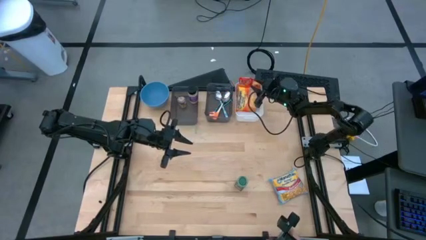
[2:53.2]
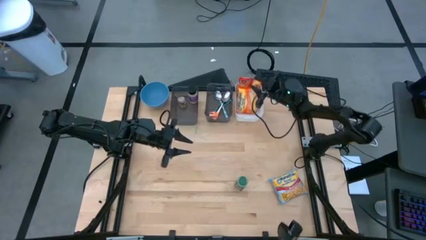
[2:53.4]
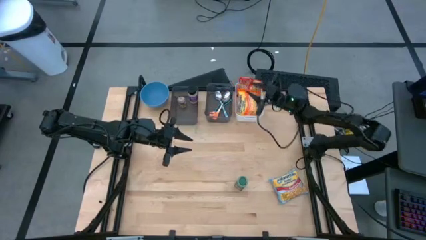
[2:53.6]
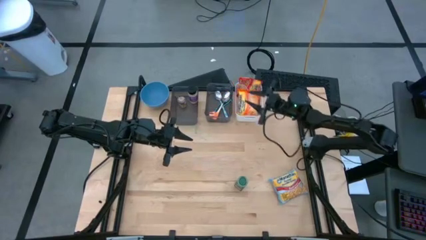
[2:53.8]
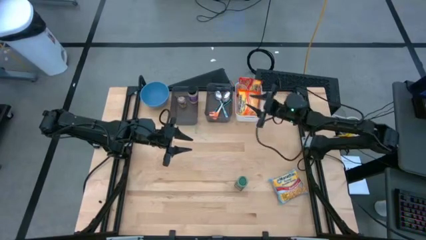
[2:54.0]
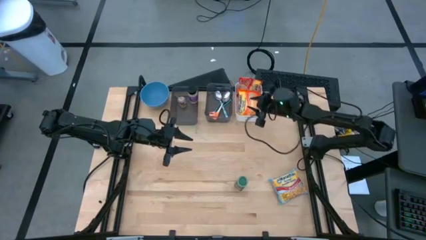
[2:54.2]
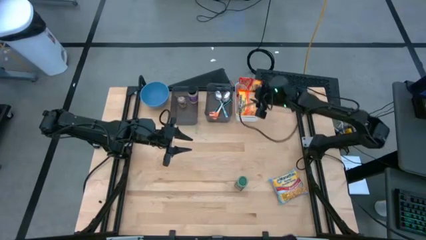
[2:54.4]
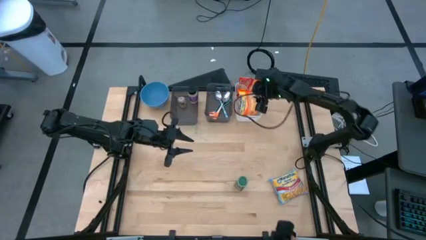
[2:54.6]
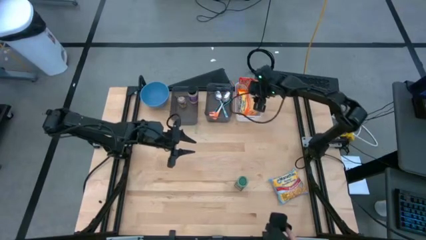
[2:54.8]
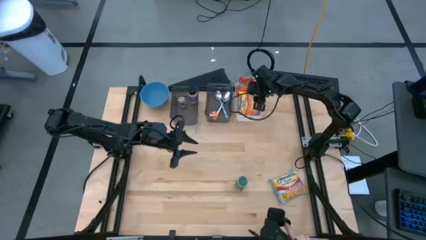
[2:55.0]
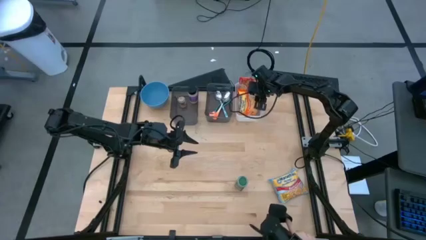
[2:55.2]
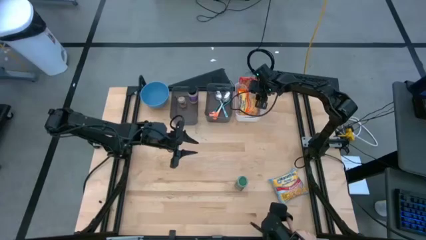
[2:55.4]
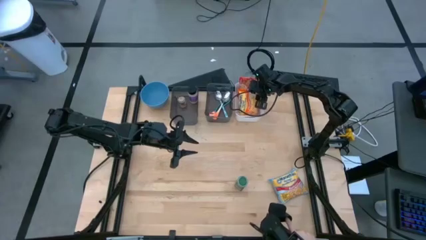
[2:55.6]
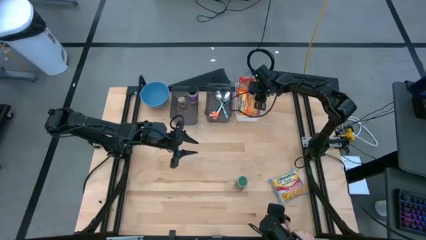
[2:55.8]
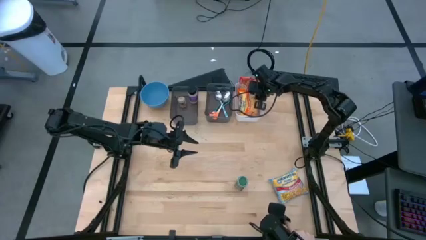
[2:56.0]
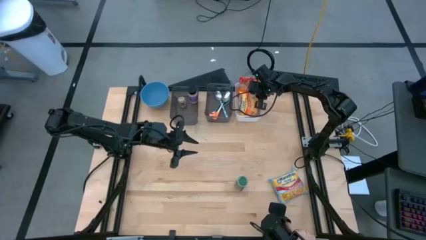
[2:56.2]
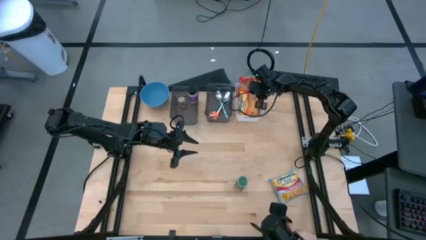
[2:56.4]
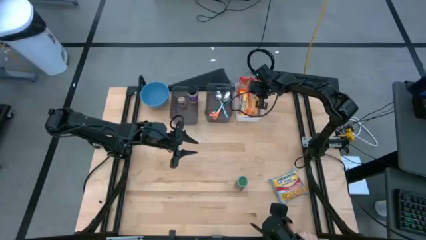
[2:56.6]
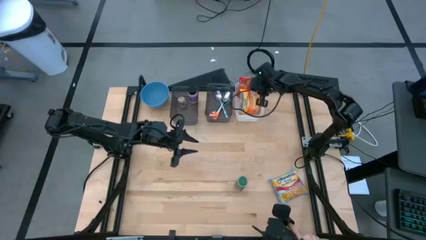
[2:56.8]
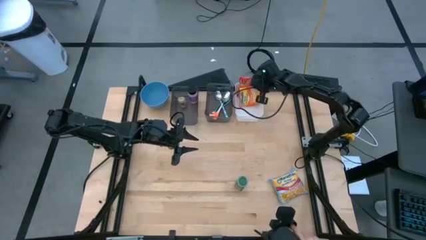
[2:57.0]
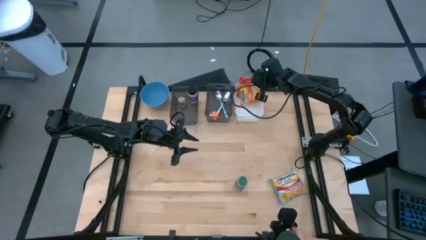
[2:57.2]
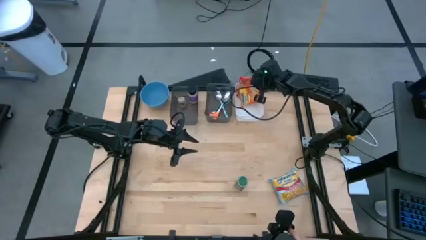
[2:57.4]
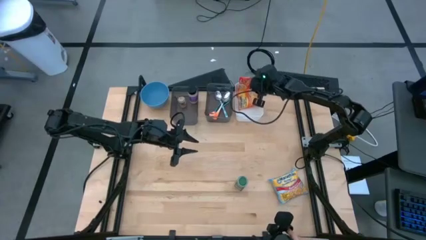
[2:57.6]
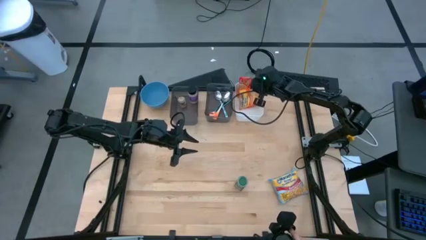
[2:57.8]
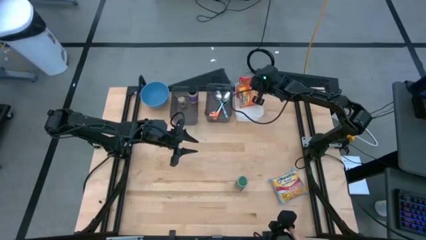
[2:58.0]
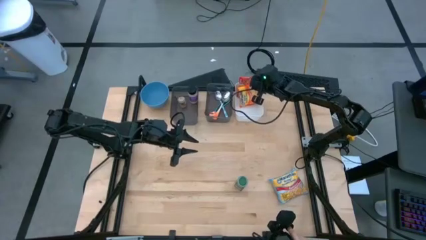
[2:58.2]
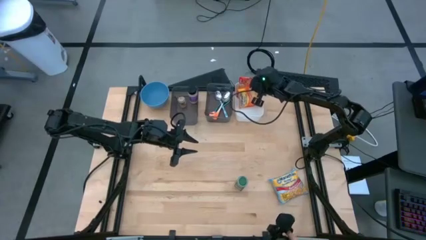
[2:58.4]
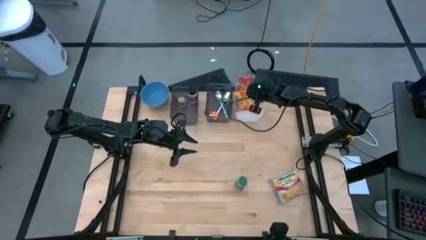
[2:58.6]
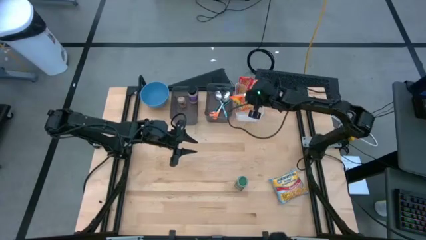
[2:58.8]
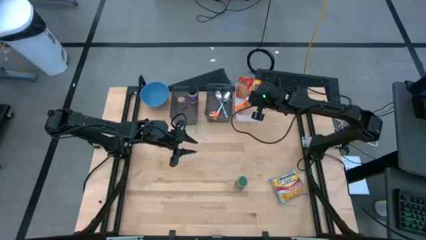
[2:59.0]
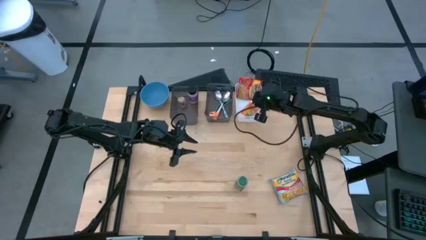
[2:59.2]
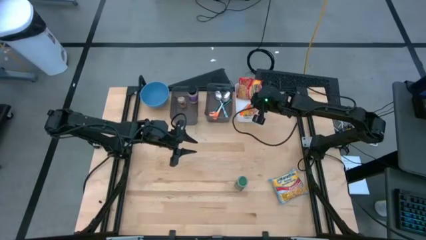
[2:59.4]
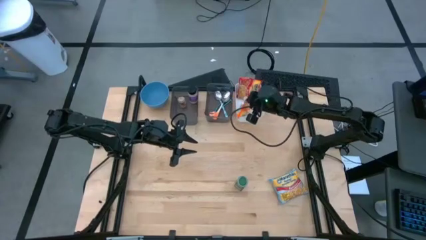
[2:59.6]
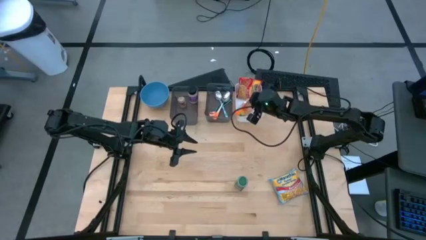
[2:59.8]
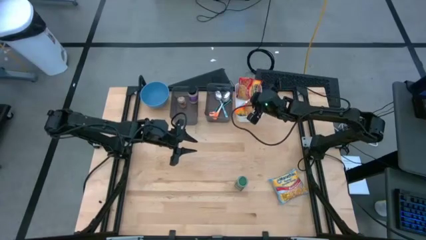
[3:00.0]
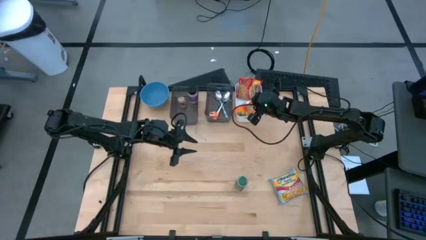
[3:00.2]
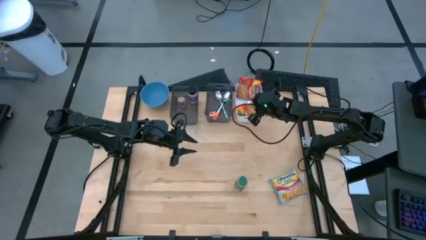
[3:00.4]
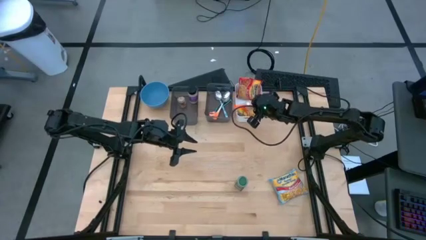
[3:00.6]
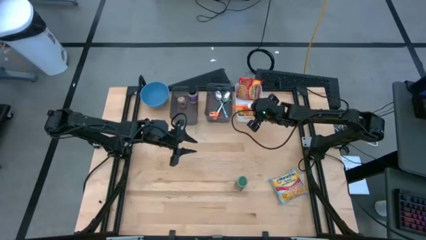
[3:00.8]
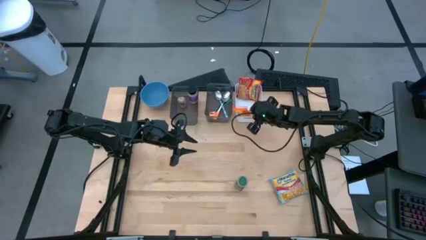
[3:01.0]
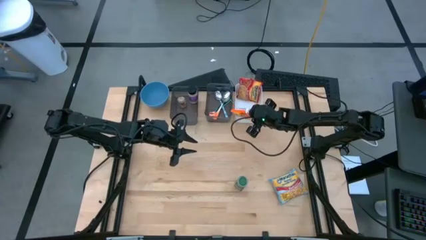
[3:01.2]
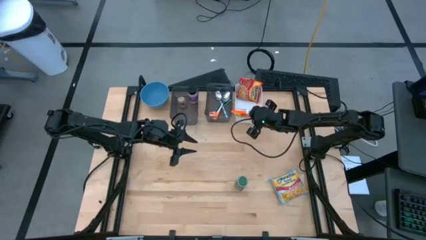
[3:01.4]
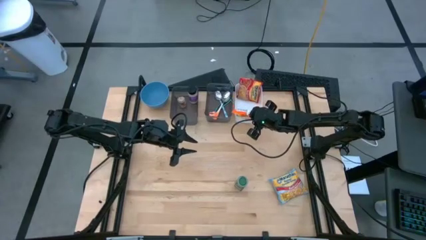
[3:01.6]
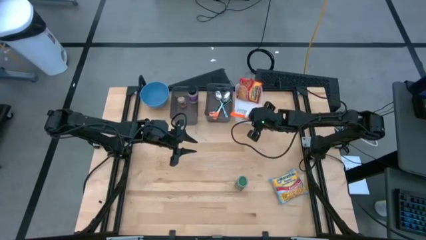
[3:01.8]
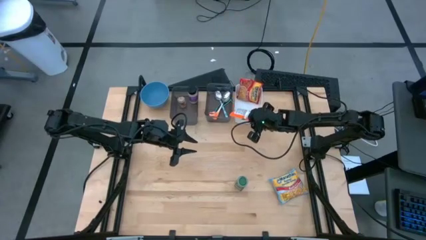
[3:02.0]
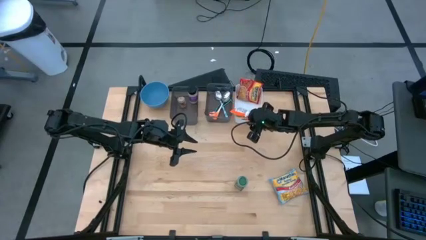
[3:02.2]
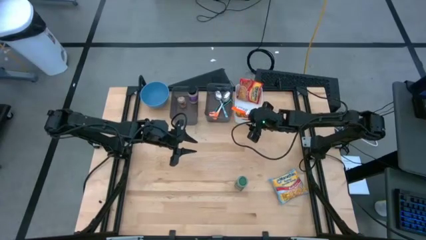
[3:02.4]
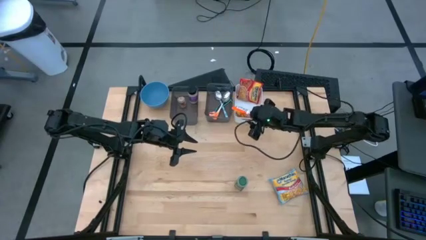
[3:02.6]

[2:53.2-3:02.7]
Task: Pick & Place Food Item
Adjust the orange noodle pack in the white bin

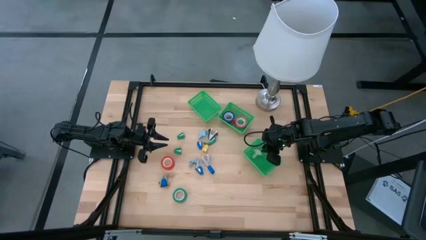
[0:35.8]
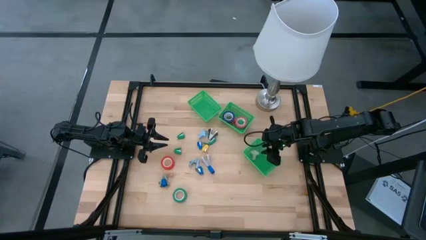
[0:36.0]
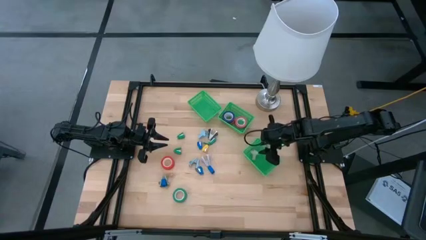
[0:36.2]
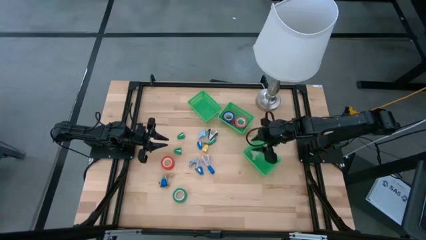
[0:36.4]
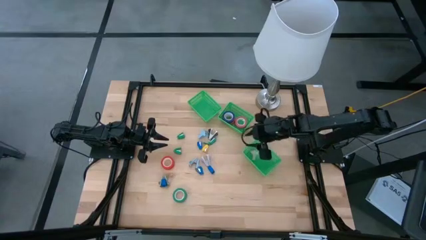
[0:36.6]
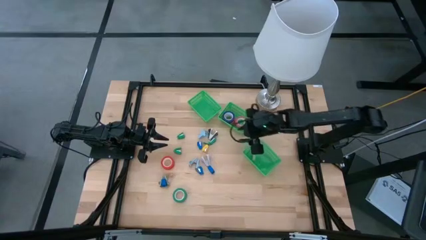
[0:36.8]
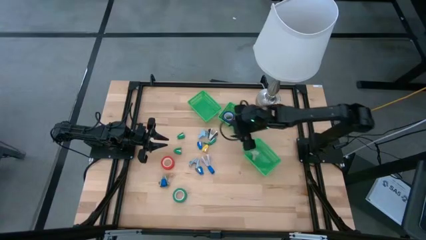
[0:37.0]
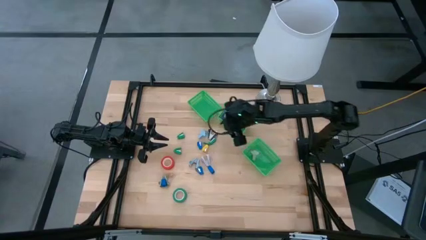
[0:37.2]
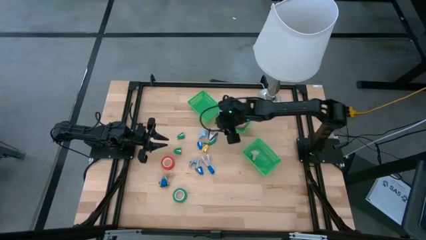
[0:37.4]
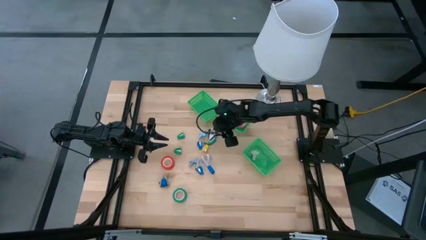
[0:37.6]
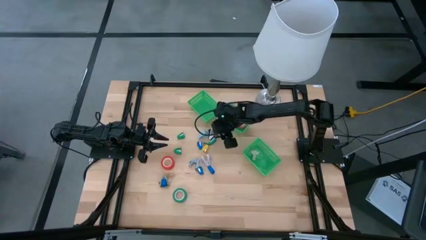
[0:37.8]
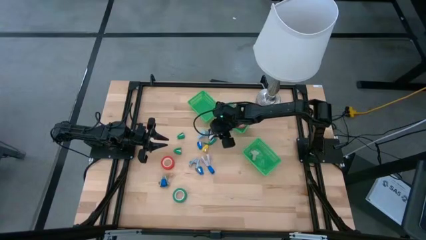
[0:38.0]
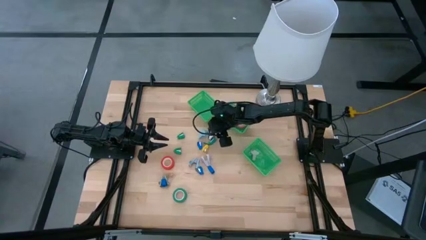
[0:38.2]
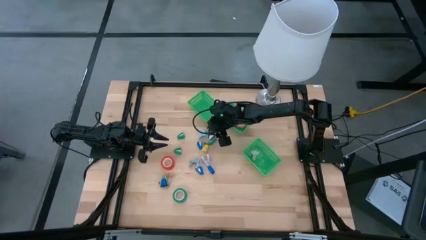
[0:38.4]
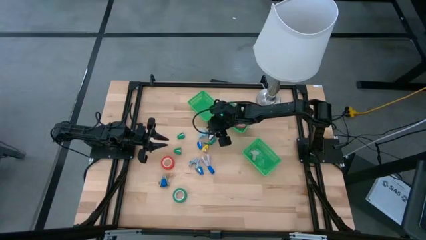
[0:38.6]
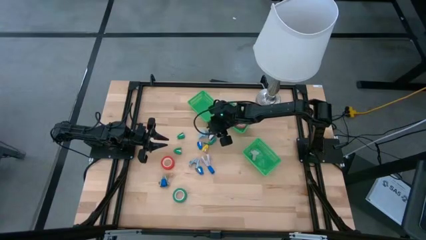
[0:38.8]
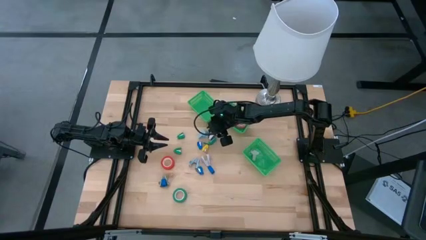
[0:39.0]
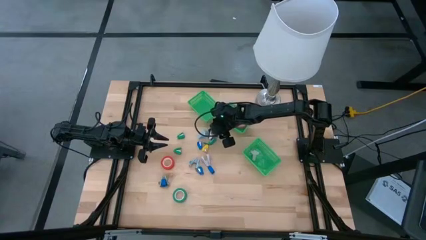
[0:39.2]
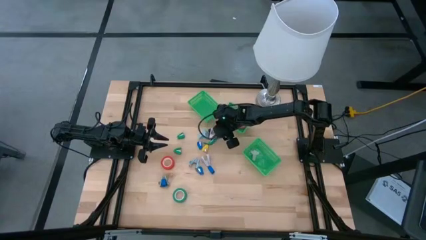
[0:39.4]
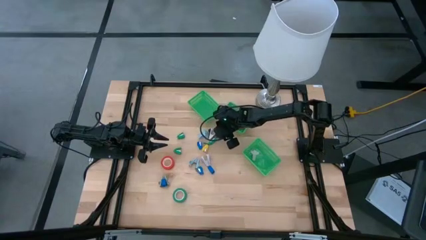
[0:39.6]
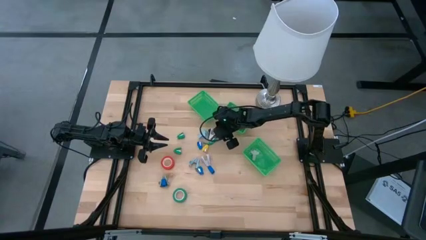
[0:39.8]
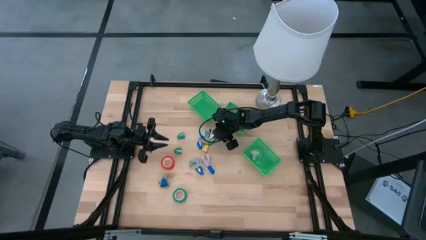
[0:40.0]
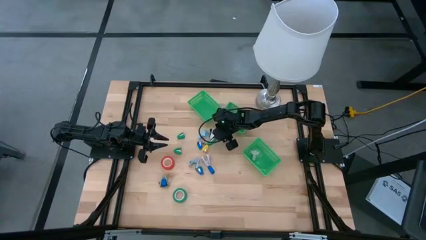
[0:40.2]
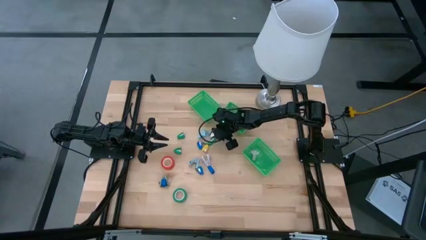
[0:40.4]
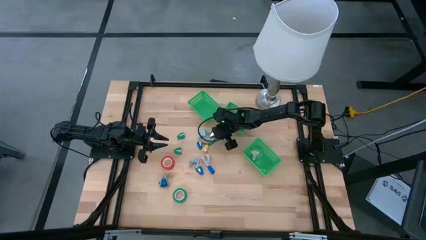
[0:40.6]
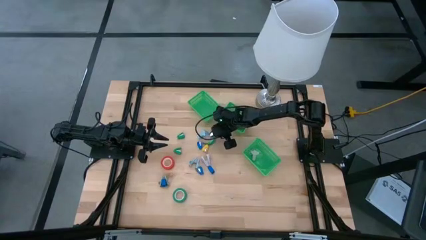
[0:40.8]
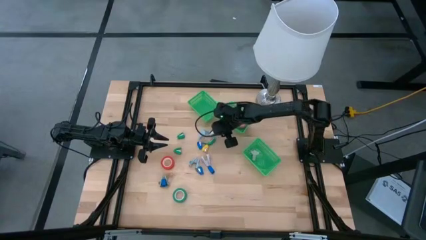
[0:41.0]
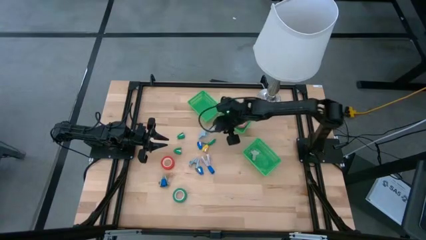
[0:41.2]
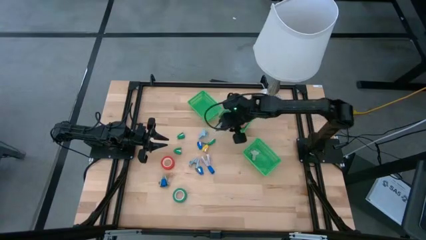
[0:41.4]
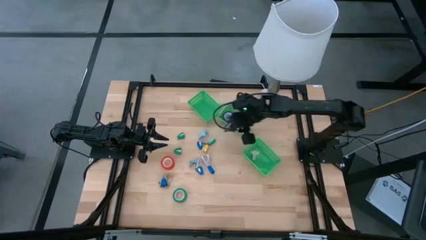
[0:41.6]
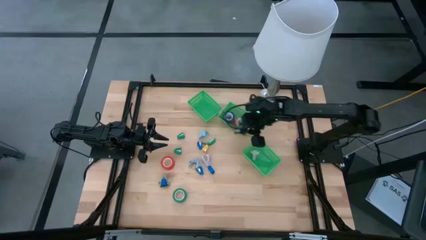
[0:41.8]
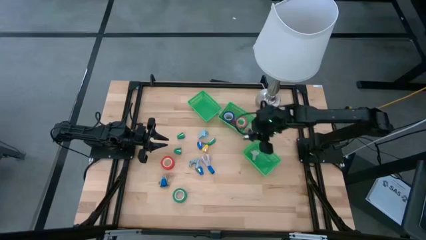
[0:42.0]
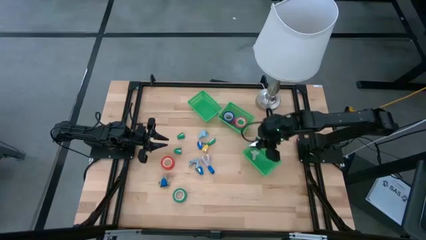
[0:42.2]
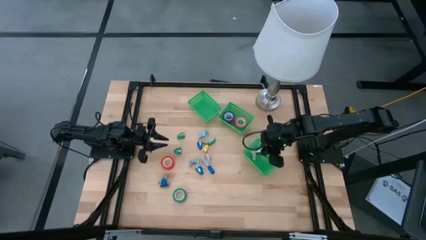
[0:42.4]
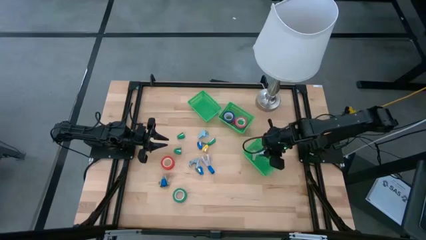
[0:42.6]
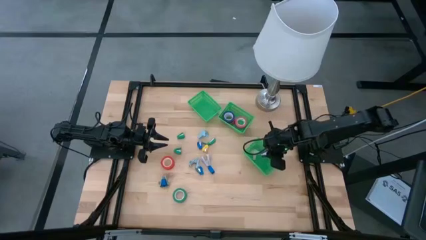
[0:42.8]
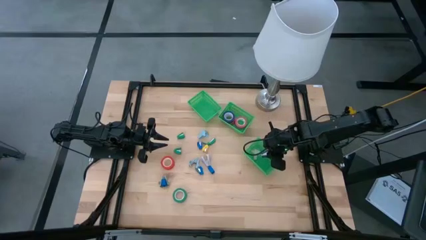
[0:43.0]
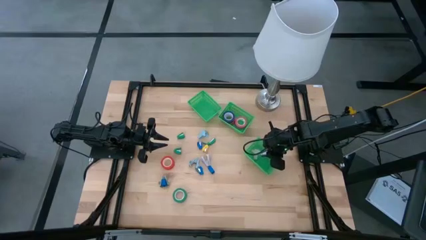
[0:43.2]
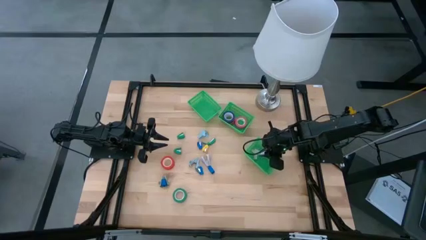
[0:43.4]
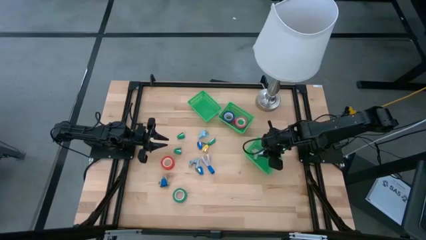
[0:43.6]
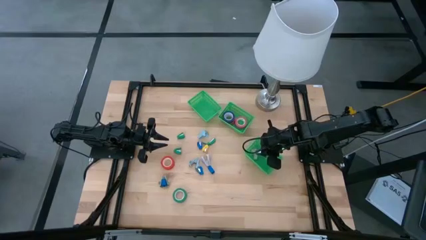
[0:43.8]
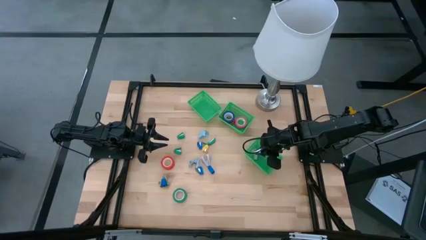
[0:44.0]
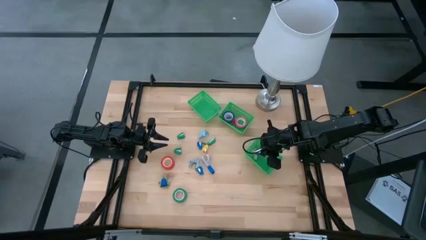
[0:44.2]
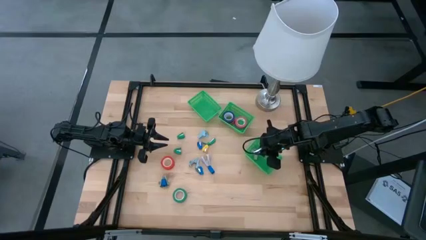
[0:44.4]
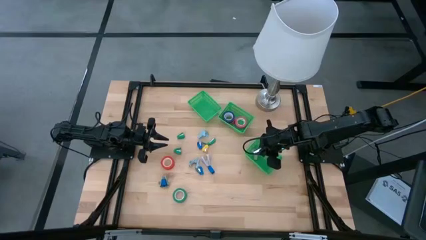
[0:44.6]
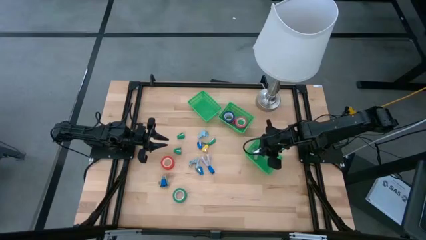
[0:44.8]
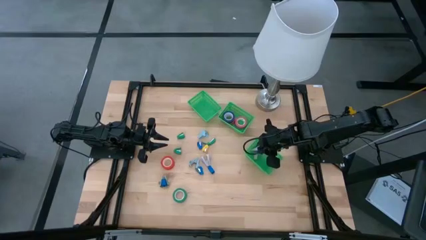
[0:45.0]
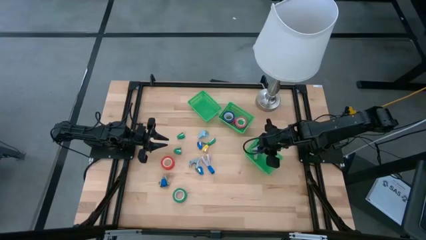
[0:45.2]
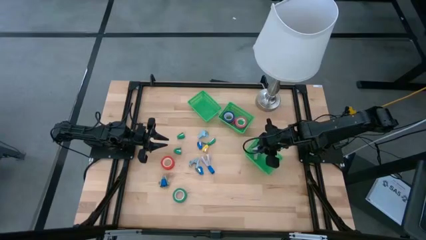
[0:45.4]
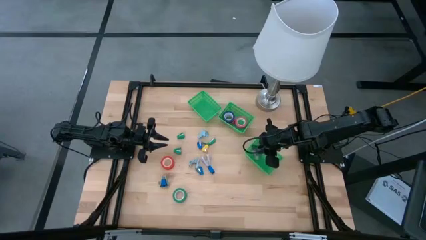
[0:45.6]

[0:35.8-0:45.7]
Task: Pick and place Stapler, Stapler remover, tape
Put the black staple remover into the bottom basket
